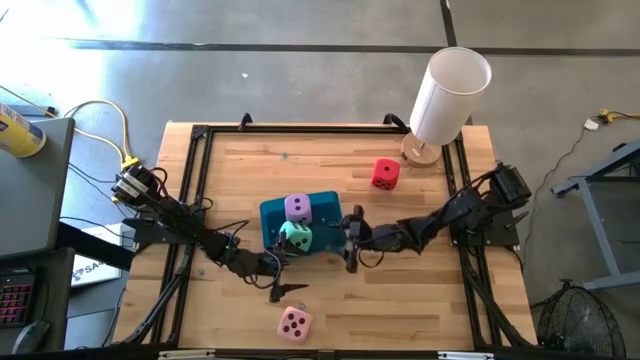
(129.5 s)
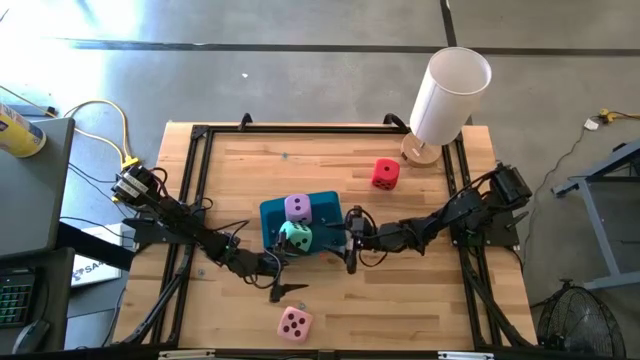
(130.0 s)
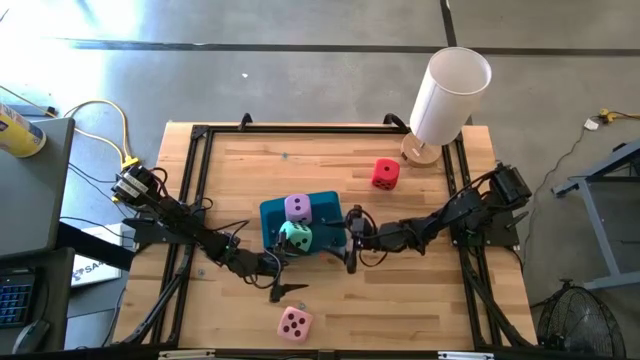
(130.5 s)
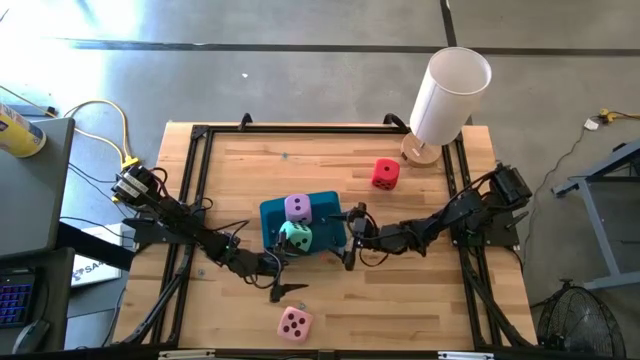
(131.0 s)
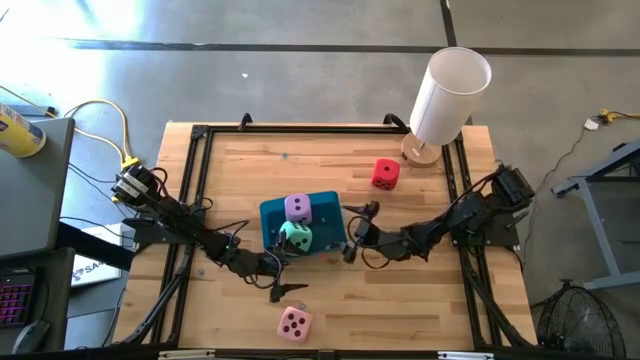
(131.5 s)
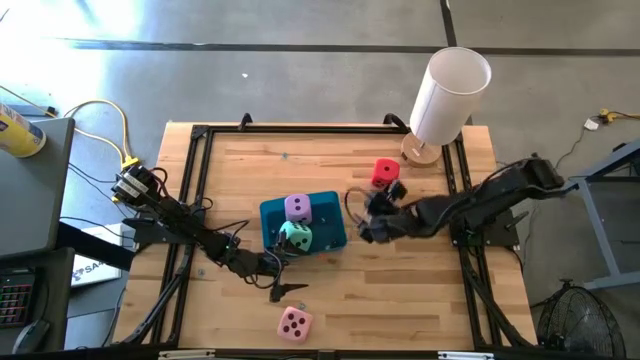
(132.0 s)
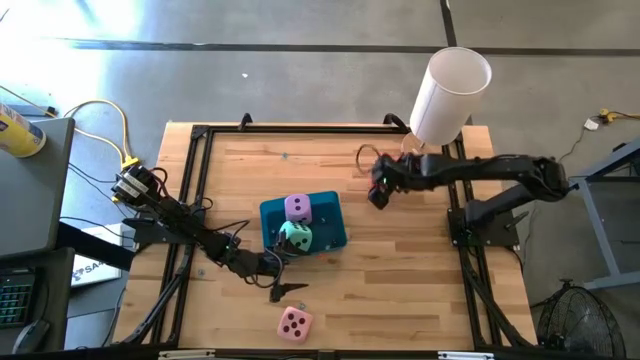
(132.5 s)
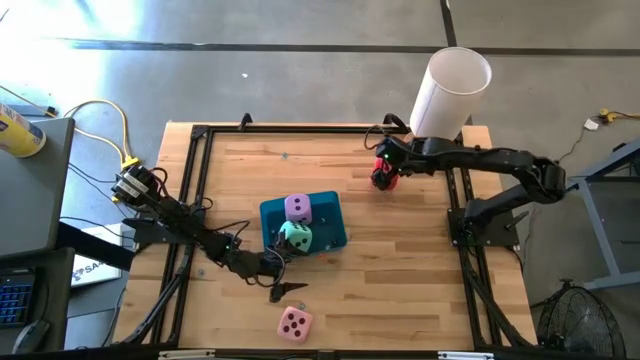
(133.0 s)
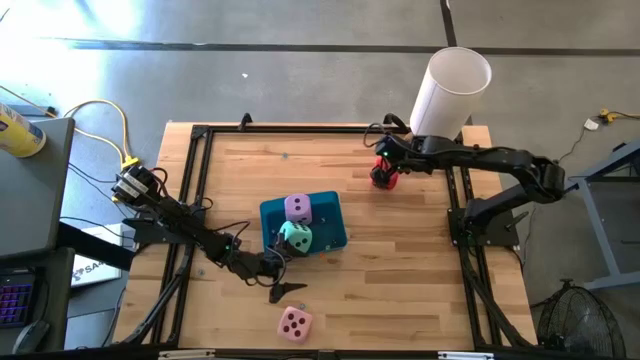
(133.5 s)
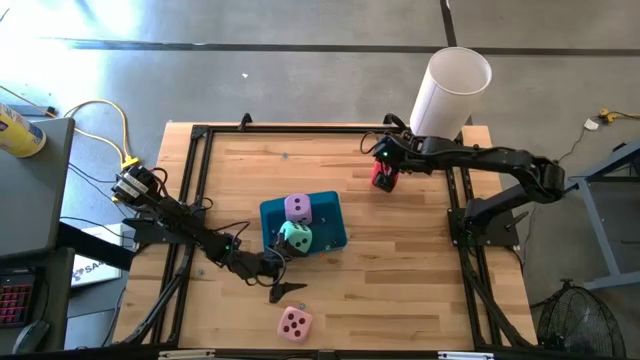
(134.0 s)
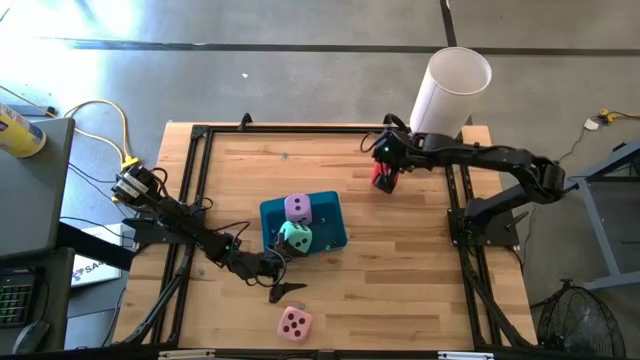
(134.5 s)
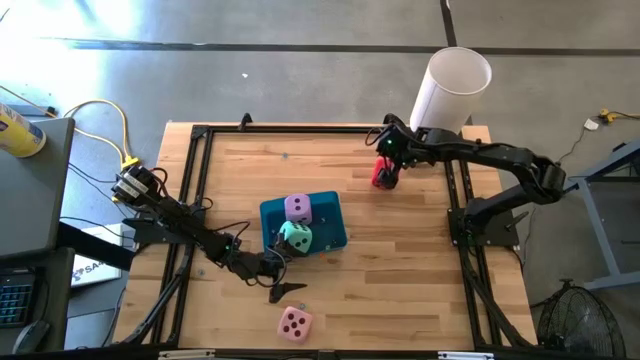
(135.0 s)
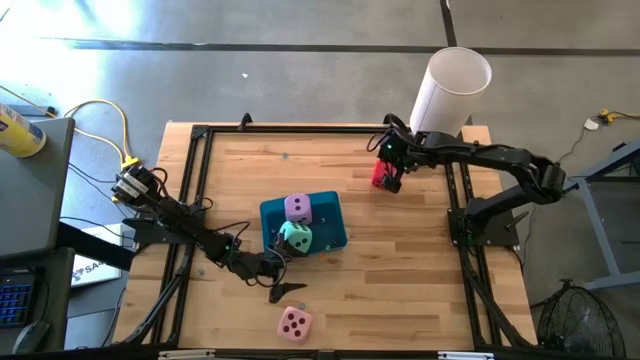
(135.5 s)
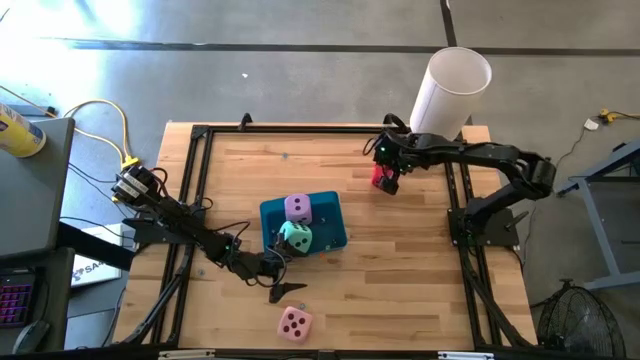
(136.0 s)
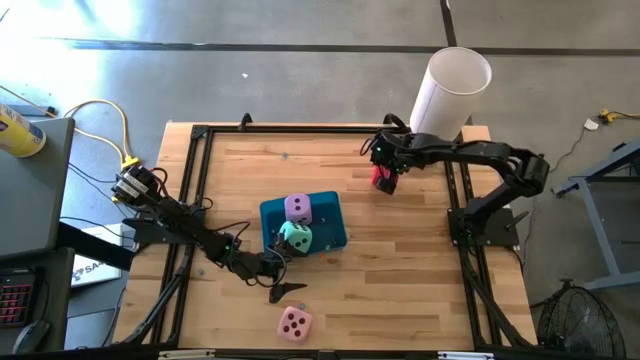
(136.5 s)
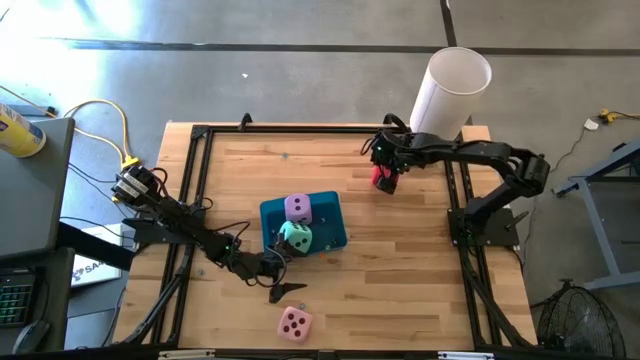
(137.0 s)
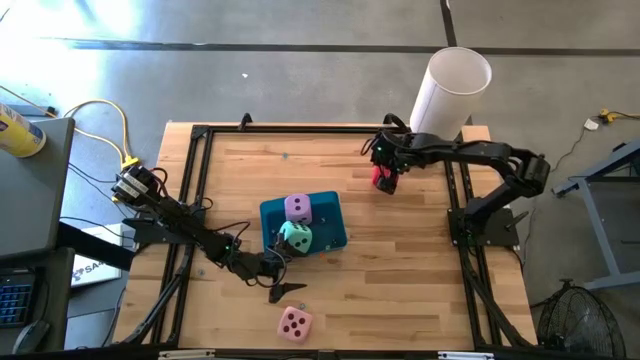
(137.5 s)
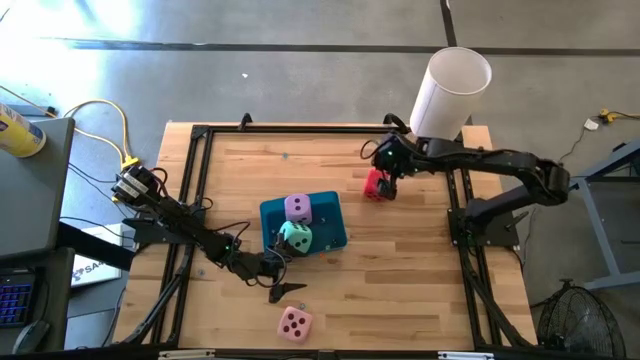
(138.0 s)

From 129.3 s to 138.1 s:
Task: Pick & Place Dice
Put the large red dice into the blue bin

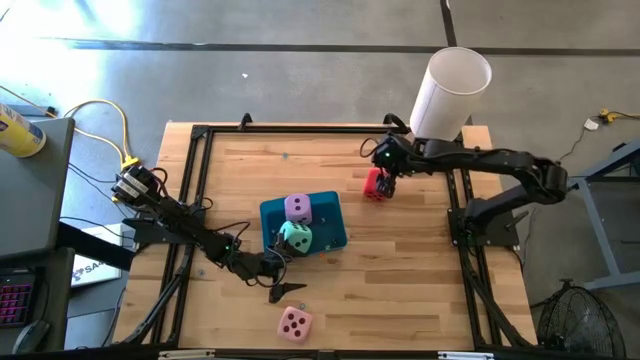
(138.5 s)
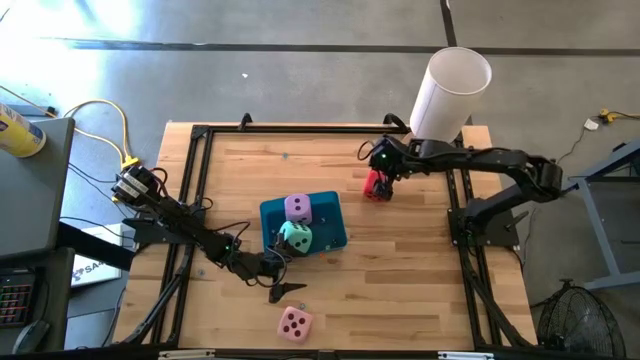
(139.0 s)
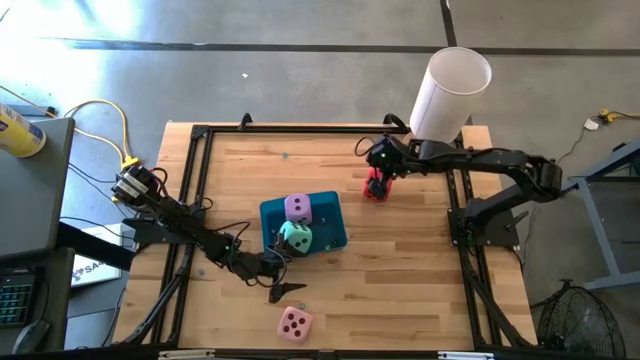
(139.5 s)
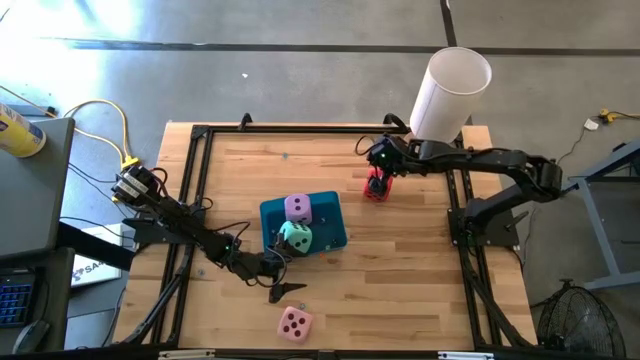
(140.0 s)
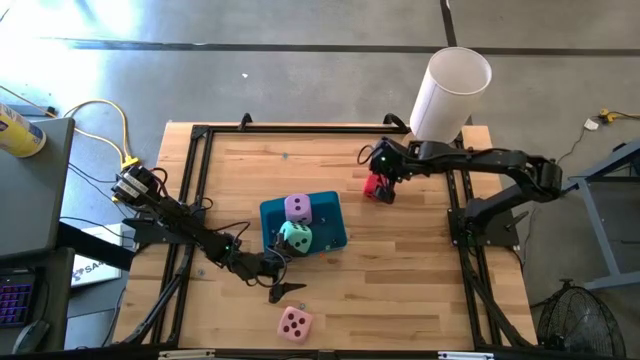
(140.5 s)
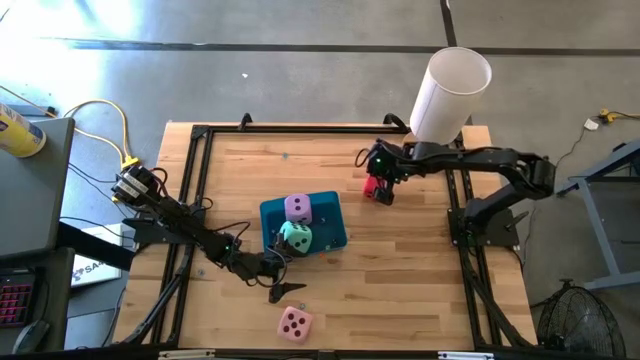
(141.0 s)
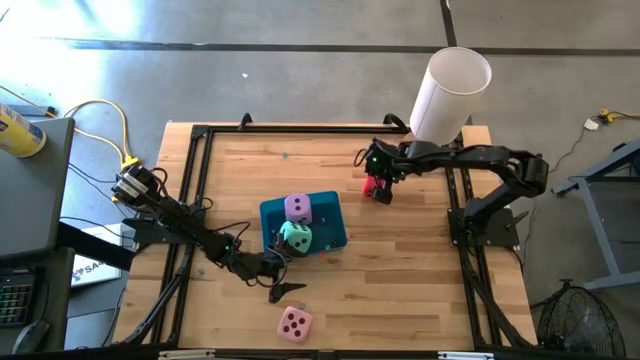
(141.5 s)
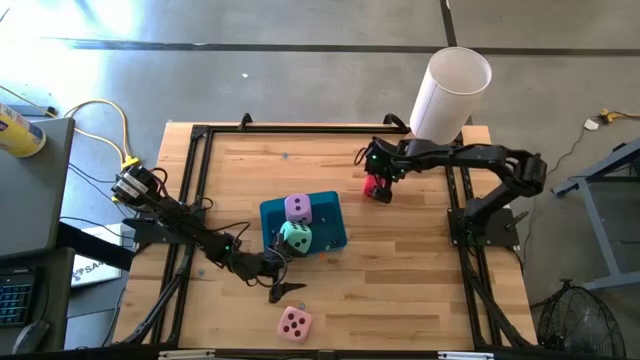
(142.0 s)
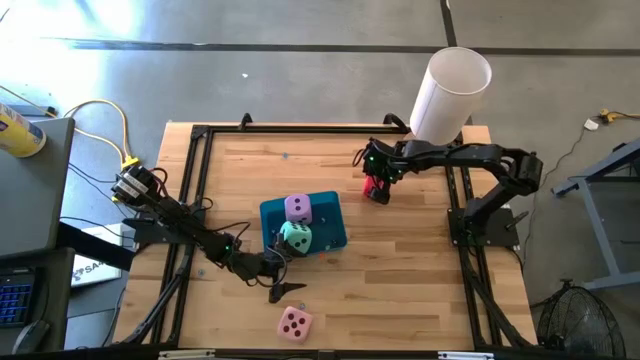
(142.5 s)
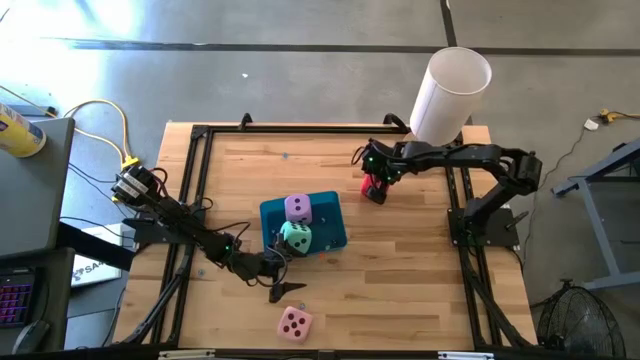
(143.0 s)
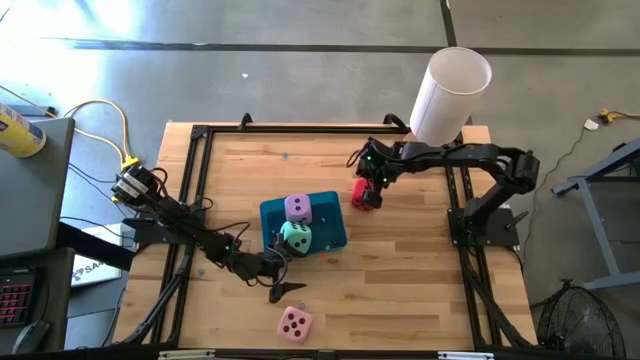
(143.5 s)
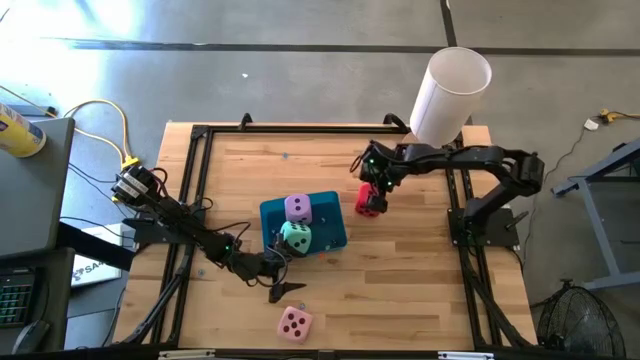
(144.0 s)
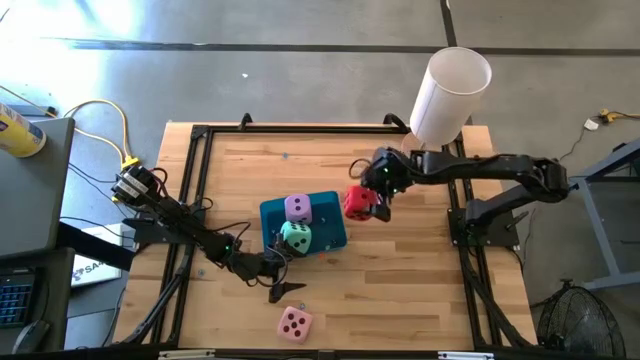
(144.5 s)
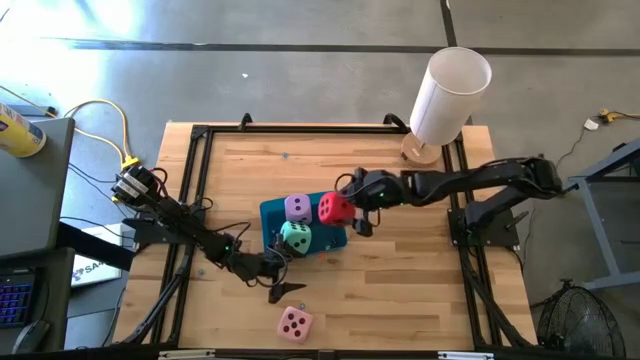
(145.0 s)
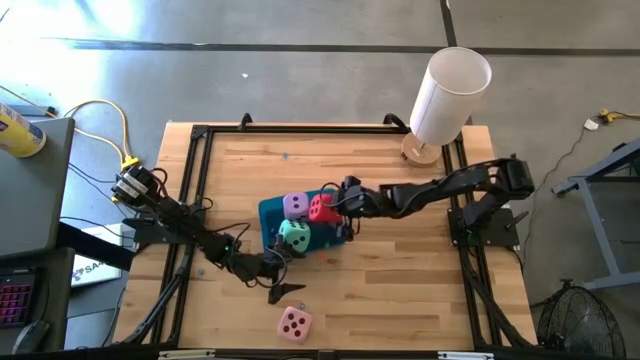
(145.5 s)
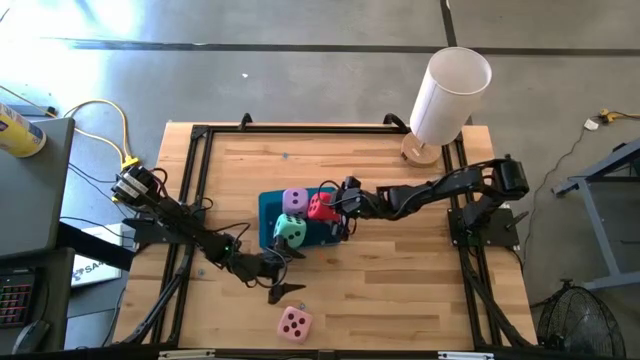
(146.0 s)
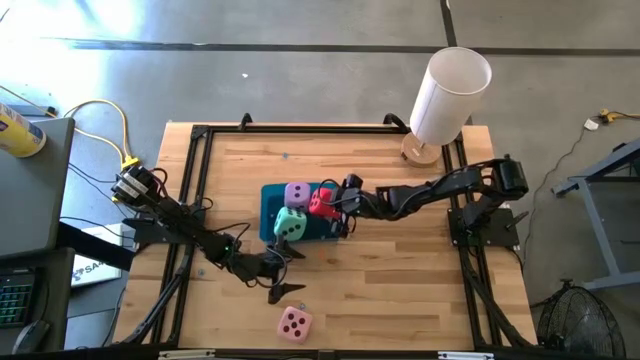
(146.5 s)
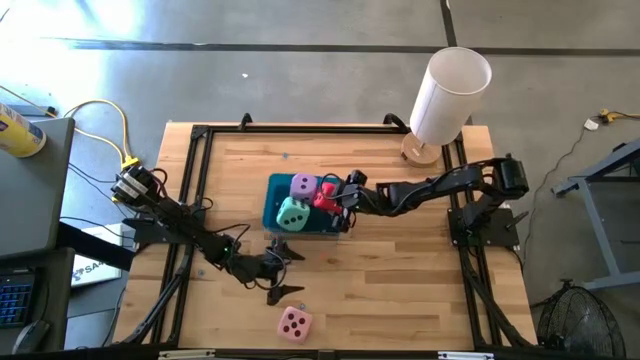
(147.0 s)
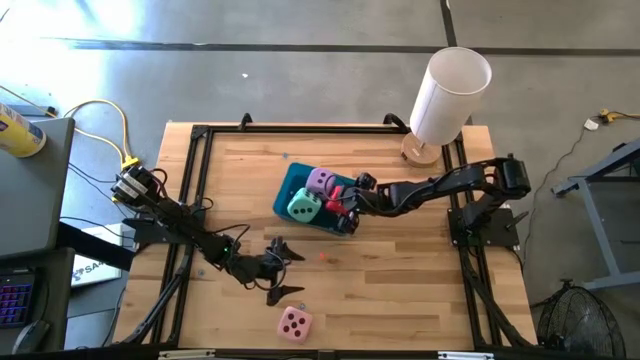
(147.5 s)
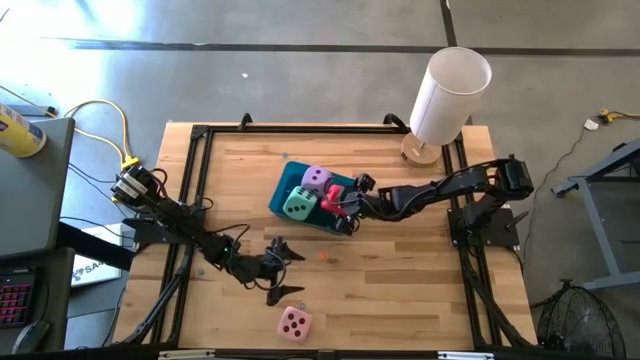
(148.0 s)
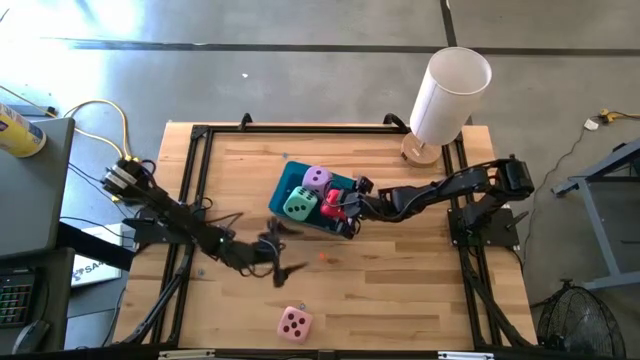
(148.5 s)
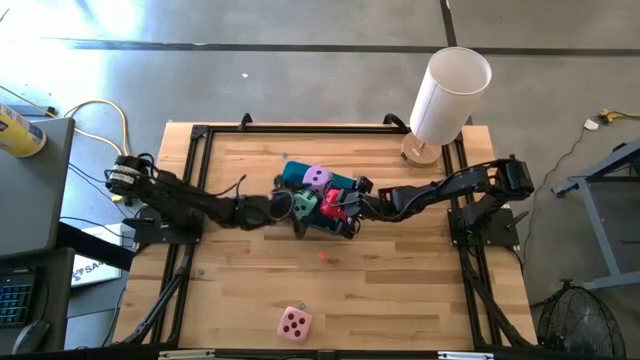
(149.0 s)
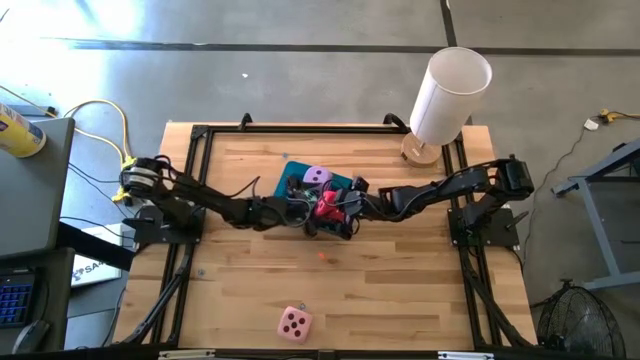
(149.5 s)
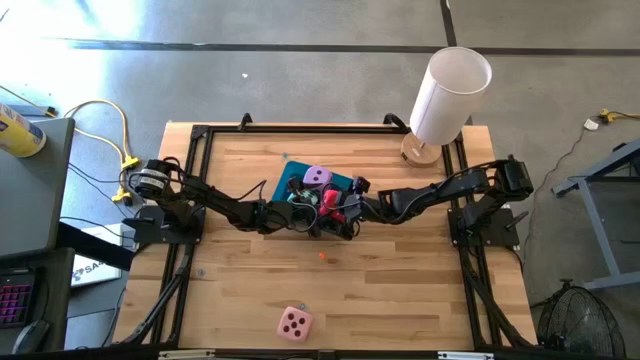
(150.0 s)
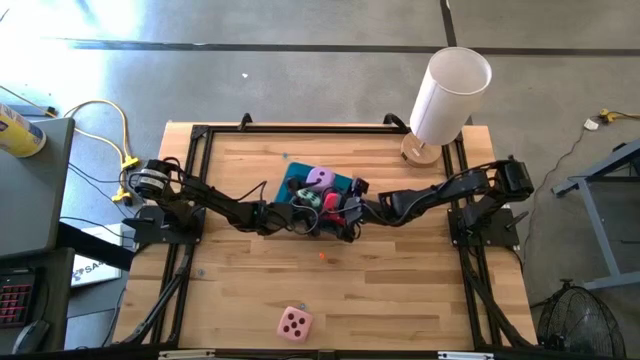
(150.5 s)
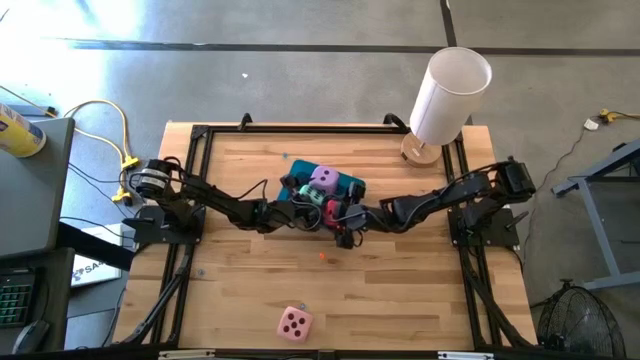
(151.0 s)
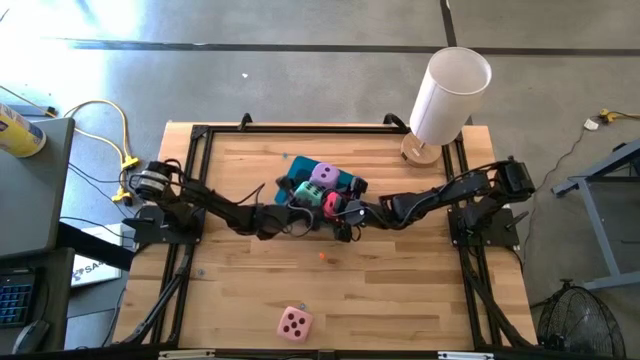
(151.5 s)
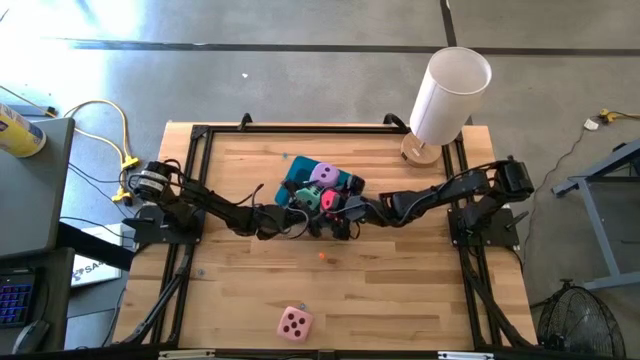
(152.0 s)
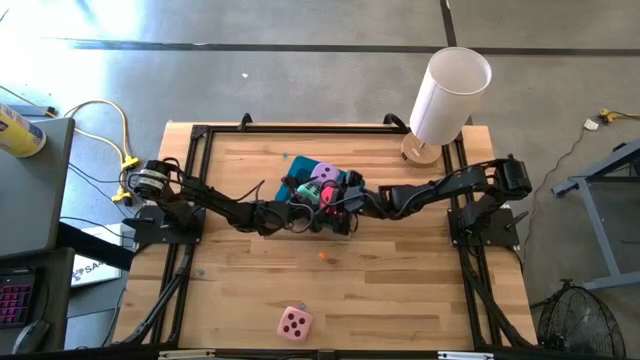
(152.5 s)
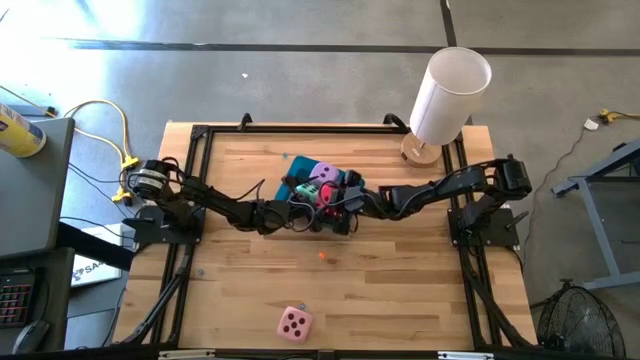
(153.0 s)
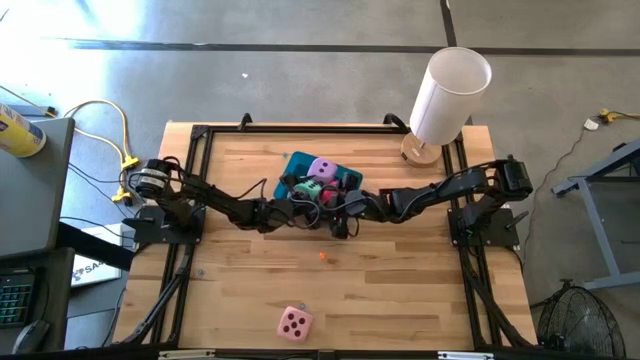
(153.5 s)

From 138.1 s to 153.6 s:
Put the large red dice into the blue bin
